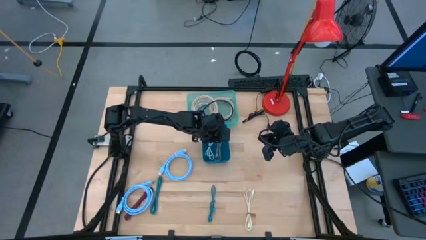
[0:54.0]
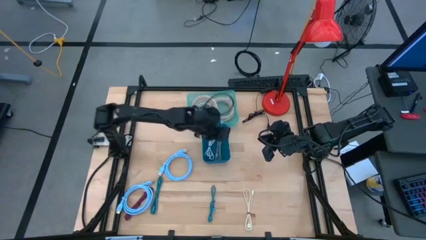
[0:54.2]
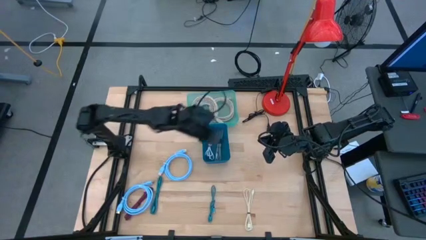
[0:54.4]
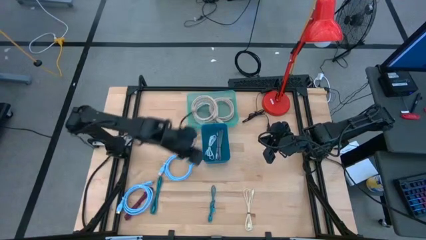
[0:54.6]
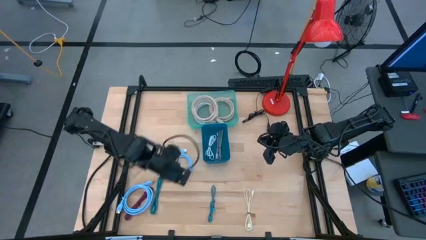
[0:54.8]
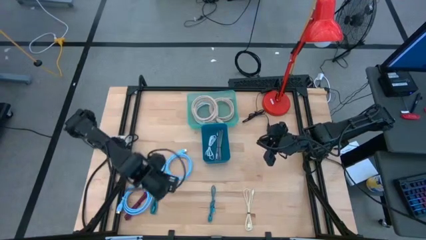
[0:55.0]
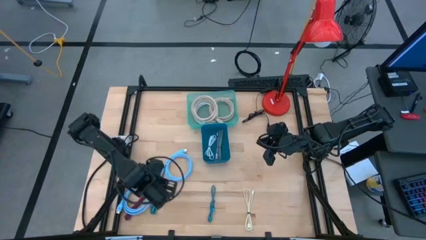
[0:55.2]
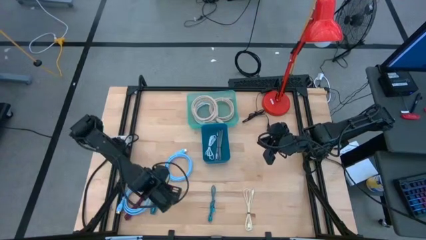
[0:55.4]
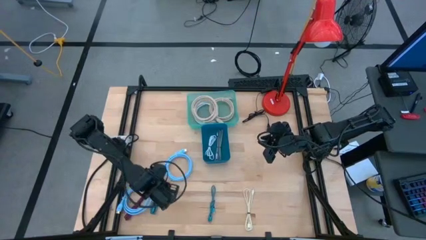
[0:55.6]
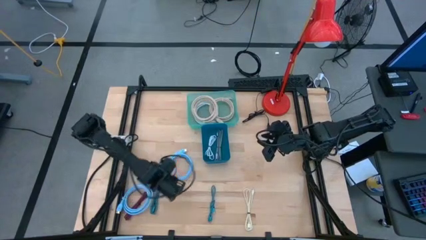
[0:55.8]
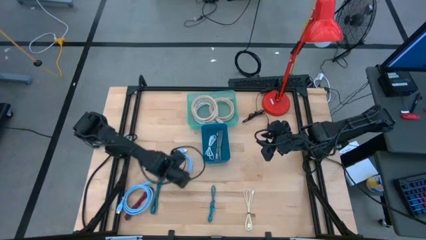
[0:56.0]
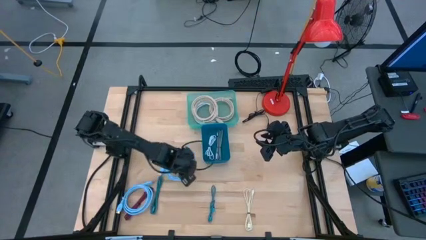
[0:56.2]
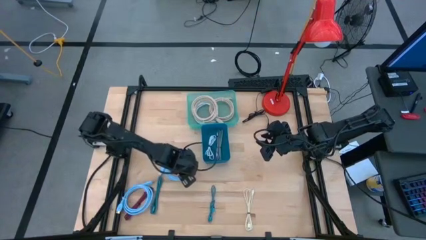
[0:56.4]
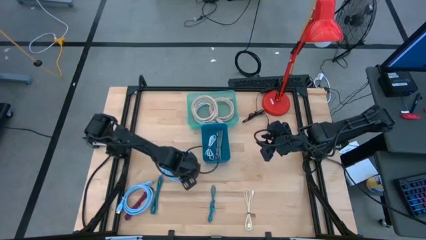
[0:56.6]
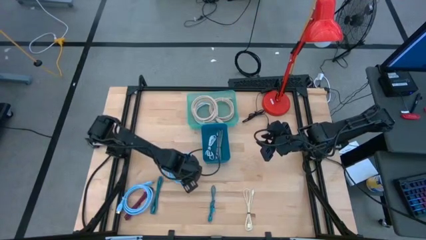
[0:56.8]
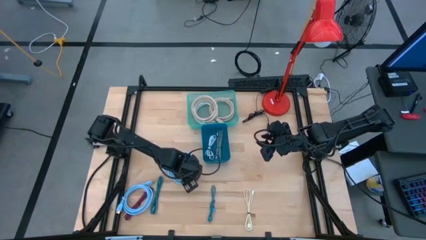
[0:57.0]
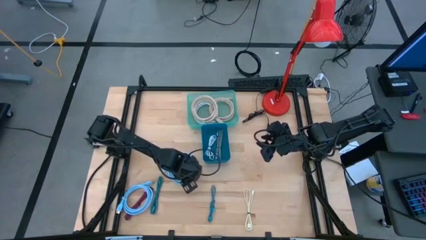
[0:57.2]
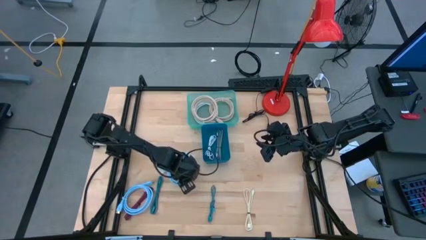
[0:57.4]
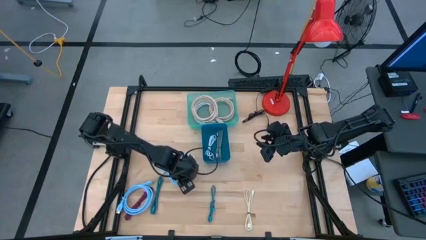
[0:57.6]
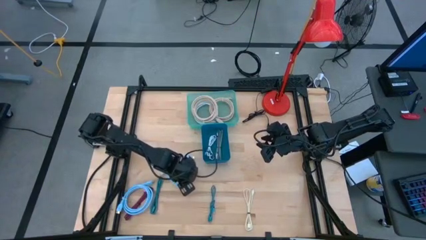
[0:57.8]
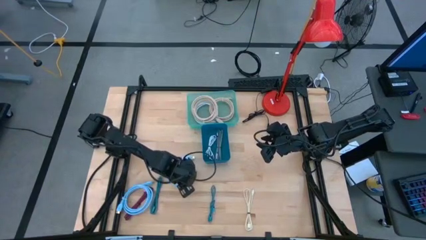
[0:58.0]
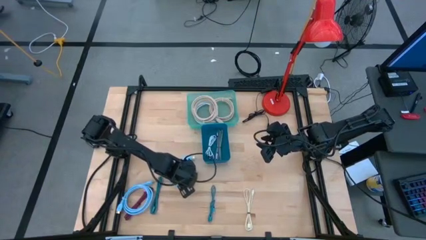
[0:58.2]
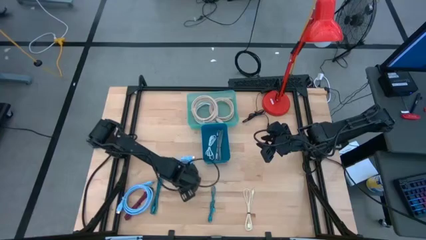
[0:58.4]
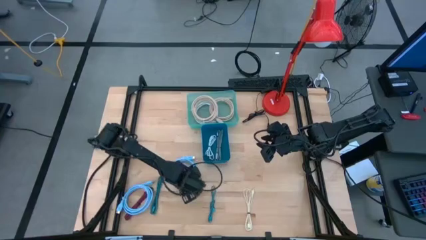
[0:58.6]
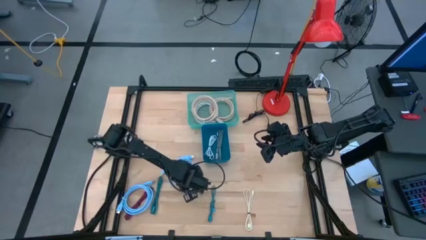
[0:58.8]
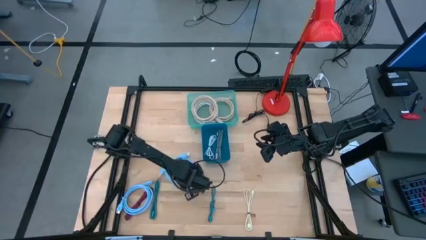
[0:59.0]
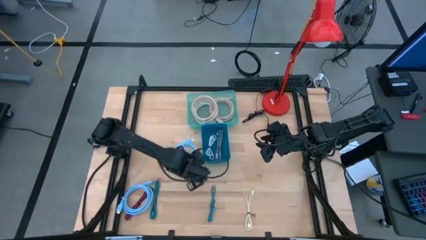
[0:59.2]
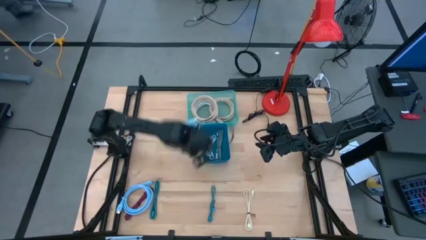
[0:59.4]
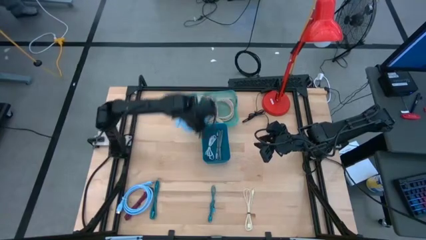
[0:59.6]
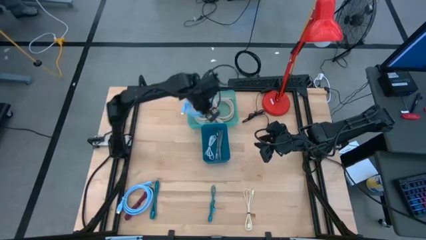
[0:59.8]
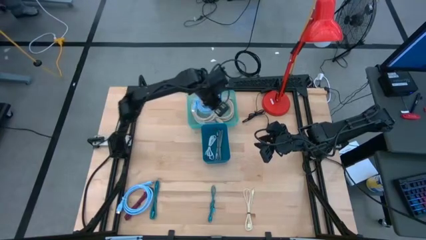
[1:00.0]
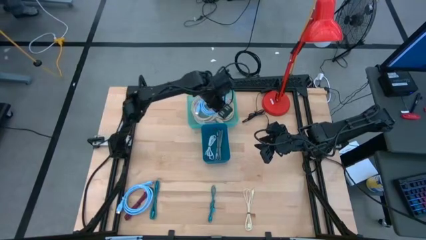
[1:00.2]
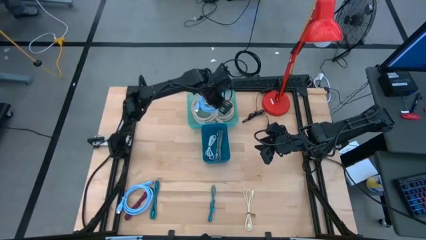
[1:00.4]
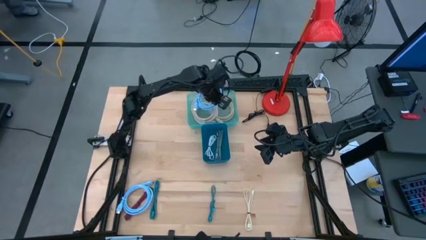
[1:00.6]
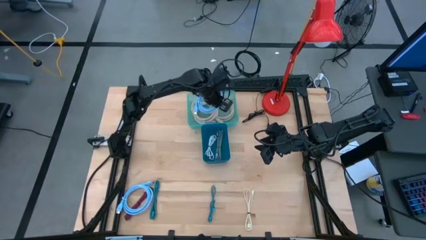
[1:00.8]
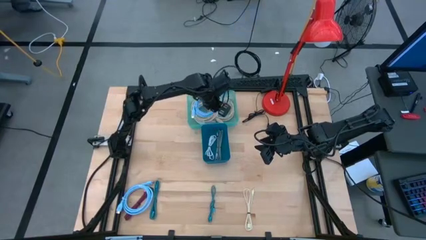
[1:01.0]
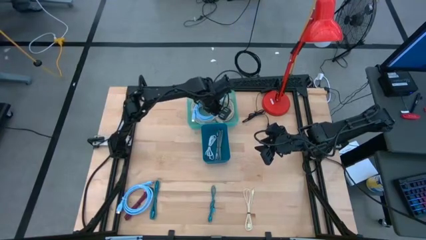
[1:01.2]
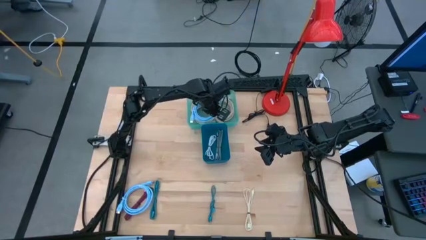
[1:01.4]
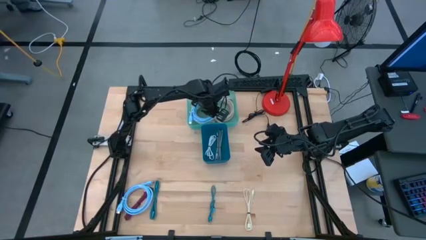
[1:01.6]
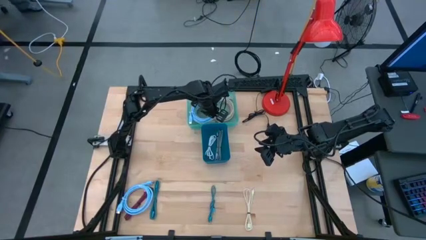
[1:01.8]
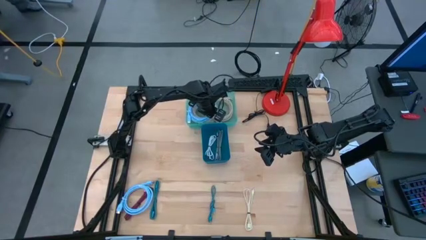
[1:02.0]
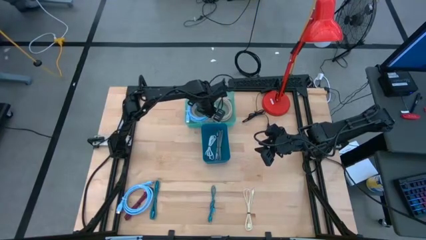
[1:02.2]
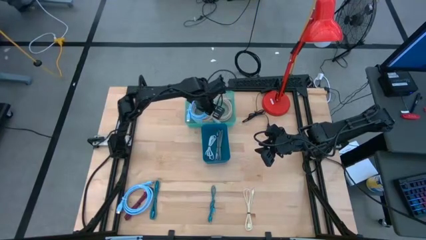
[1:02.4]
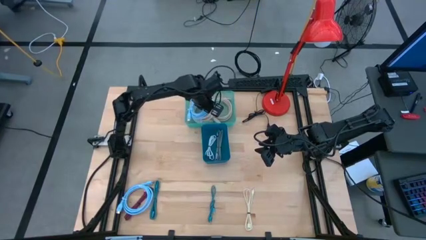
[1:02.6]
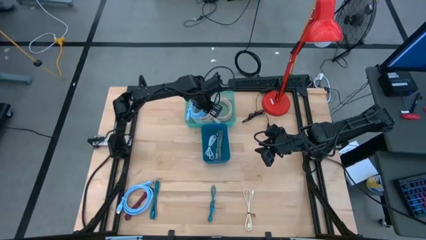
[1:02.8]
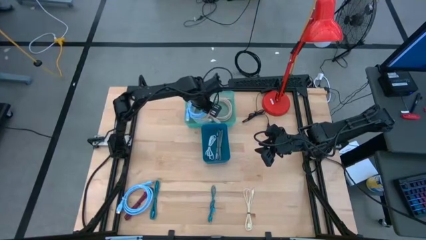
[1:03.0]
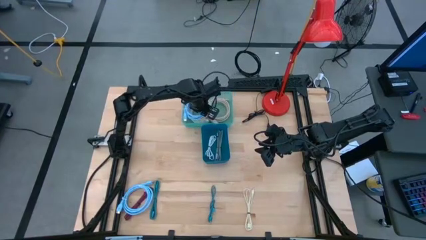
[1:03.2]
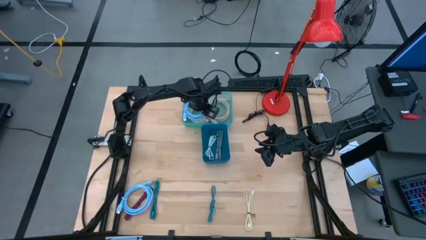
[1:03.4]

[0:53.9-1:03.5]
Task: Pick & Place USB Port
Put the top light blue HDMI cable into the green bin

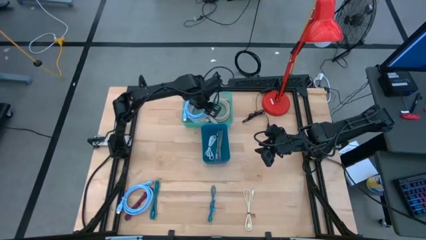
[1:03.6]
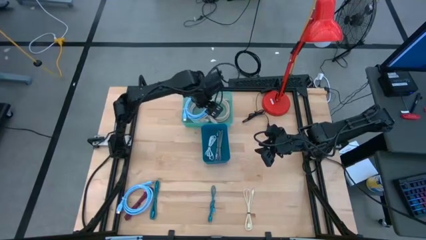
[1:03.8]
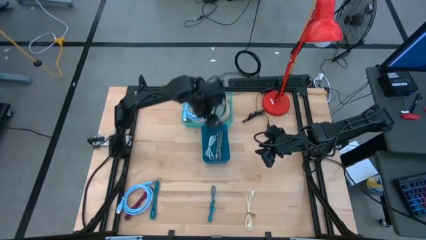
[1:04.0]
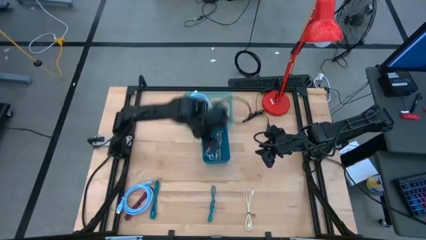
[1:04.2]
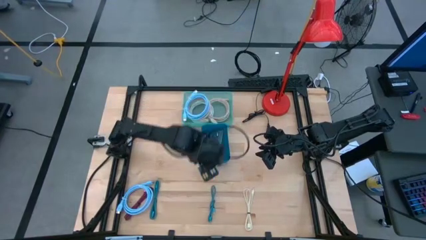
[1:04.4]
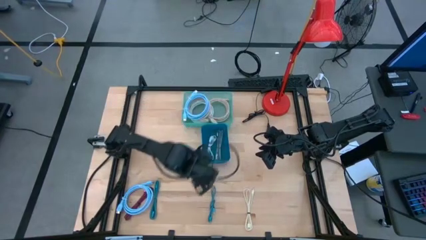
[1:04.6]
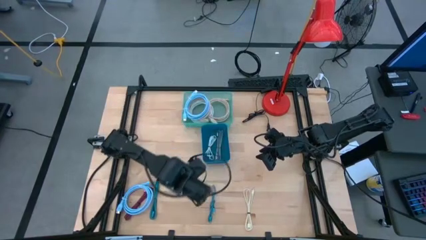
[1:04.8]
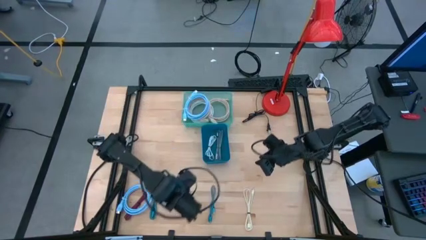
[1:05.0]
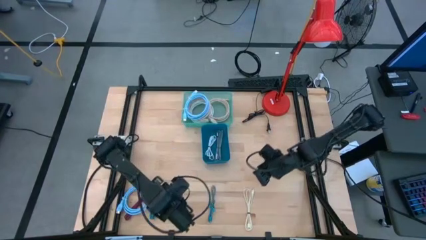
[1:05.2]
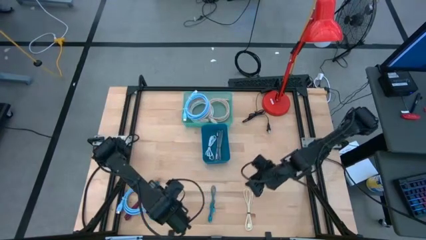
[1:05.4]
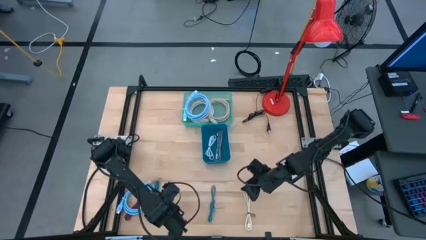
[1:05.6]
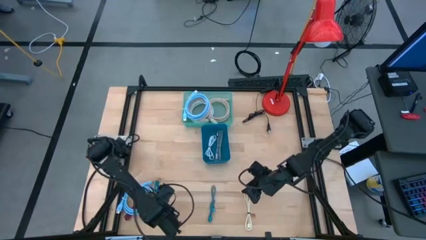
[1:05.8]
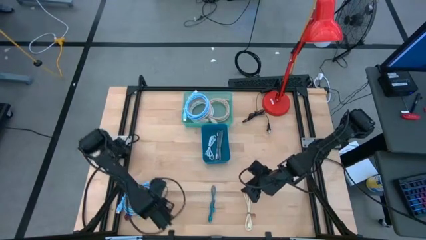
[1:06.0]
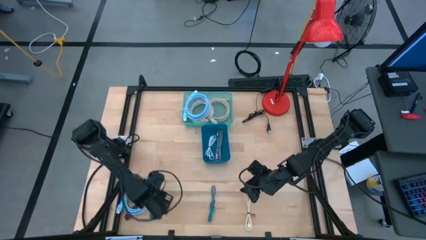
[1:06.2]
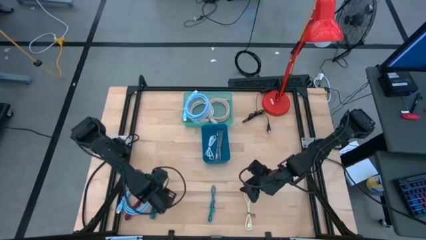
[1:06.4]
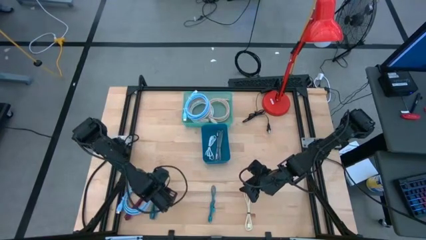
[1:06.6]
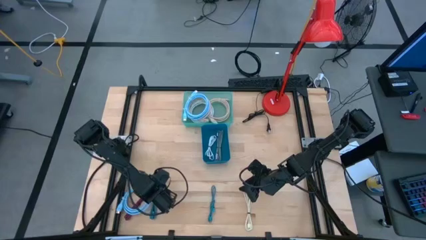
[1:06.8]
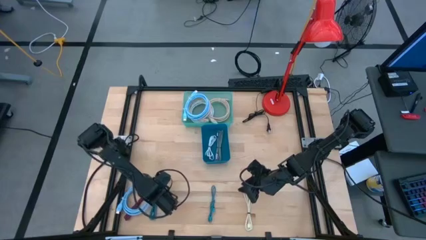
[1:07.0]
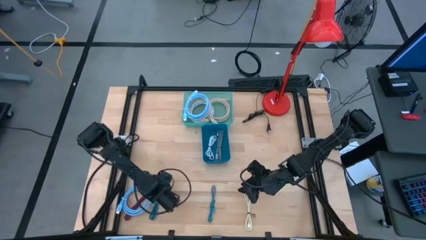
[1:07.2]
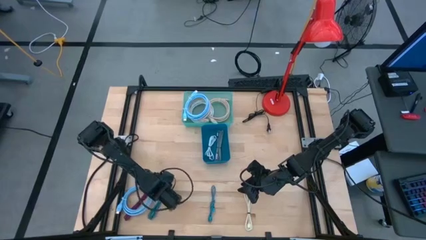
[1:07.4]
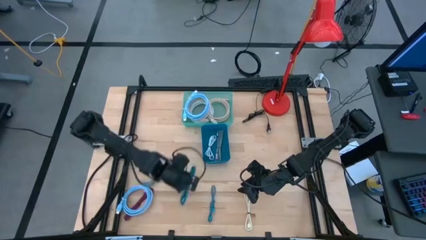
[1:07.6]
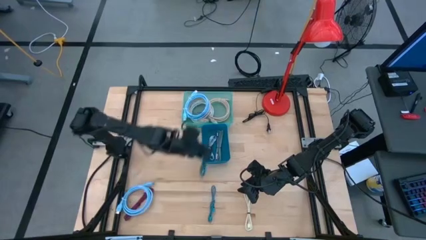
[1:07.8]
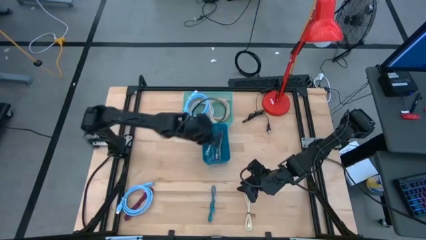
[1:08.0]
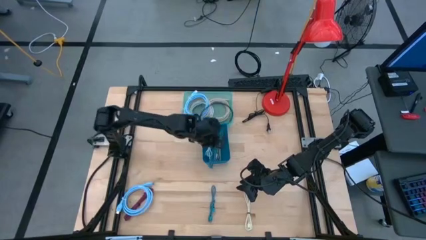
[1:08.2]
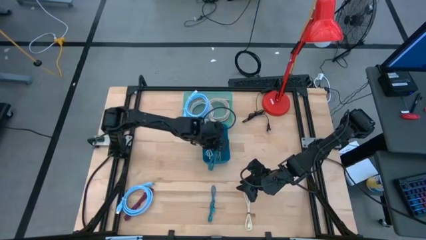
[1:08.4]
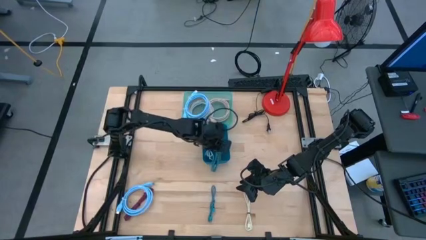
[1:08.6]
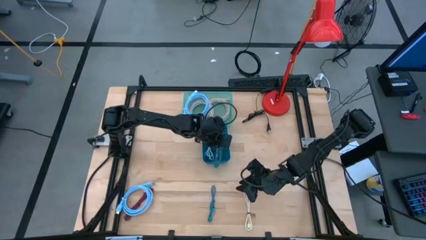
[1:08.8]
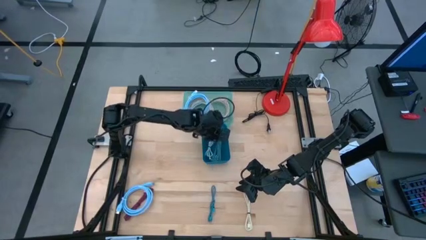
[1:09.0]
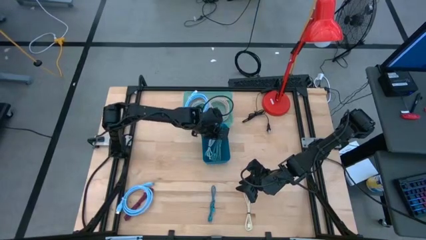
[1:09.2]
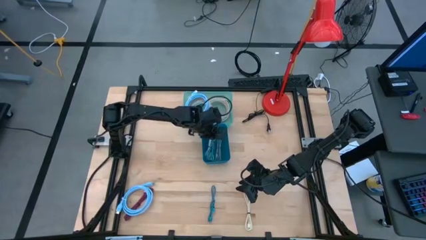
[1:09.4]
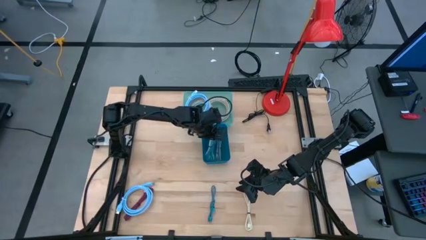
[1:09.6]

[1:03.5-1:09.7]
Put the left blue charger cable into the blue bin
